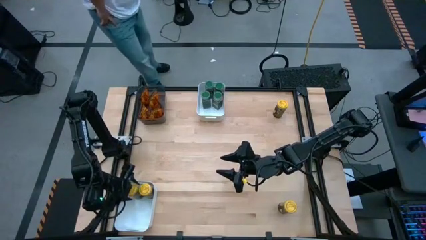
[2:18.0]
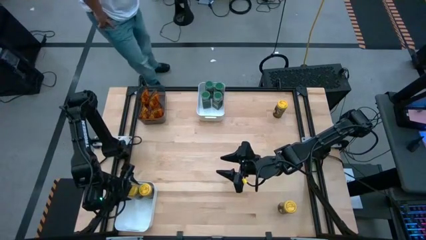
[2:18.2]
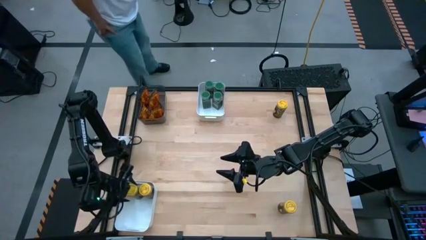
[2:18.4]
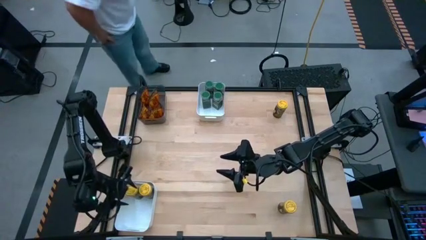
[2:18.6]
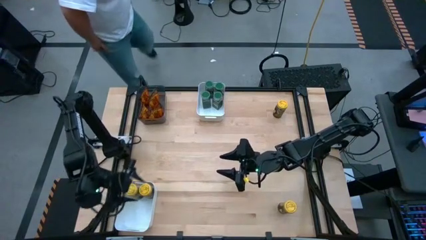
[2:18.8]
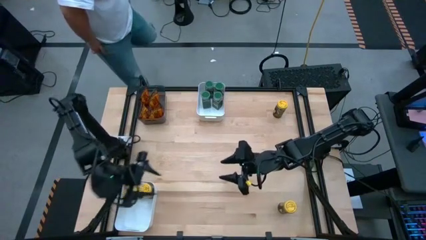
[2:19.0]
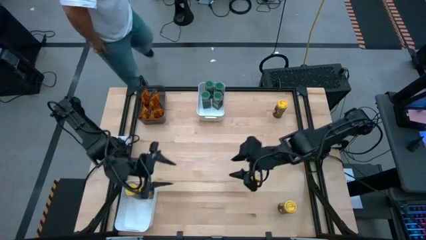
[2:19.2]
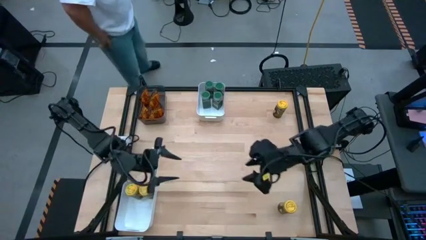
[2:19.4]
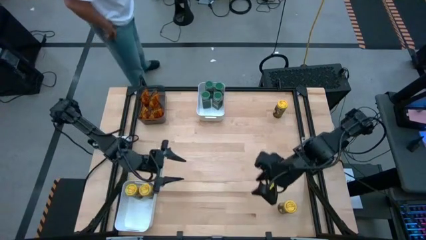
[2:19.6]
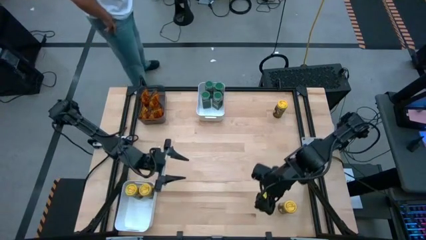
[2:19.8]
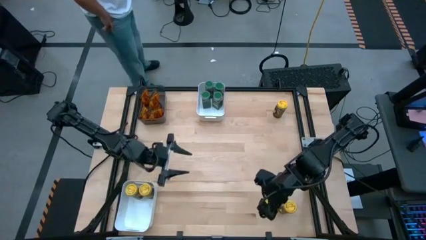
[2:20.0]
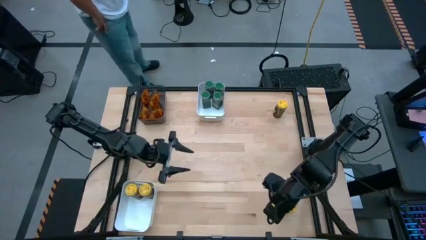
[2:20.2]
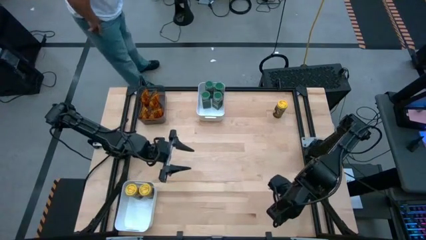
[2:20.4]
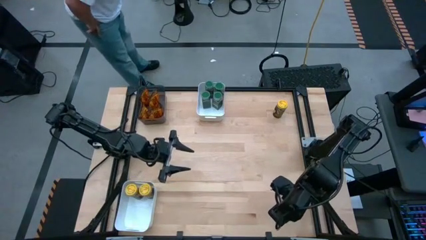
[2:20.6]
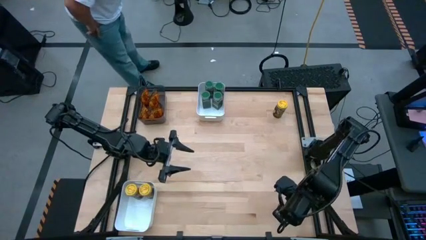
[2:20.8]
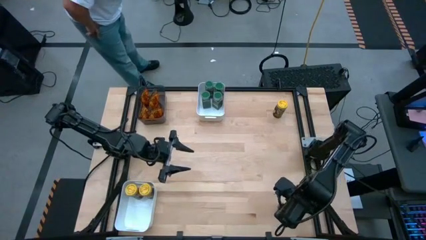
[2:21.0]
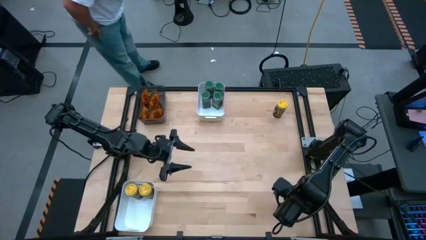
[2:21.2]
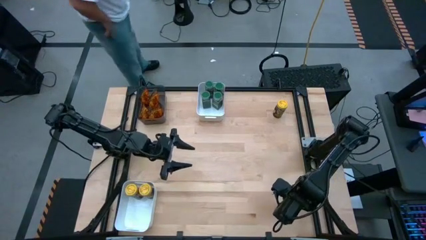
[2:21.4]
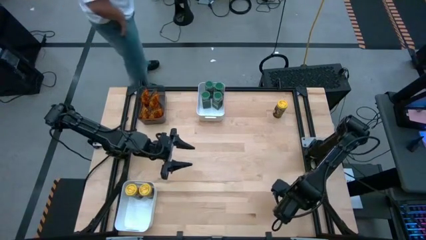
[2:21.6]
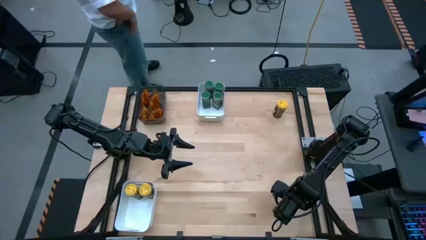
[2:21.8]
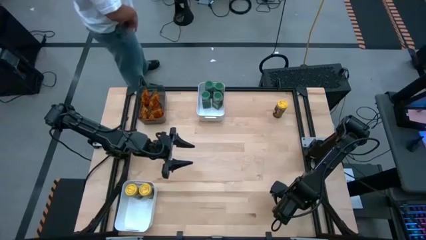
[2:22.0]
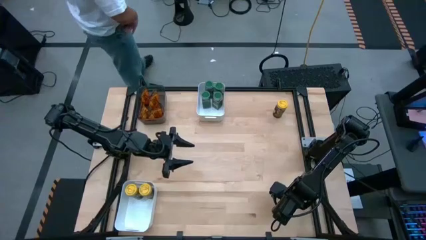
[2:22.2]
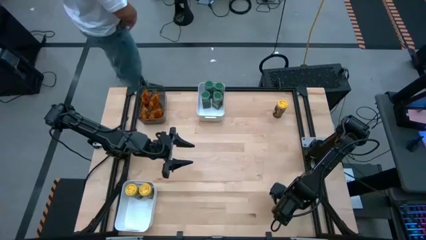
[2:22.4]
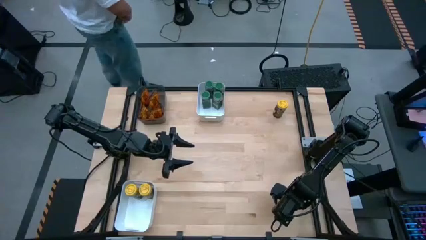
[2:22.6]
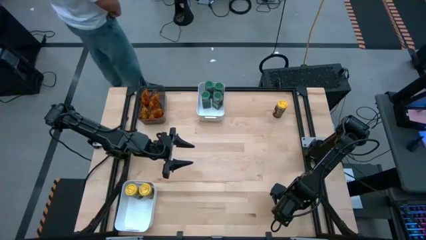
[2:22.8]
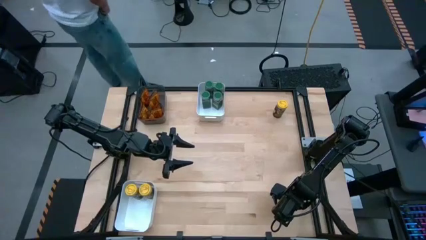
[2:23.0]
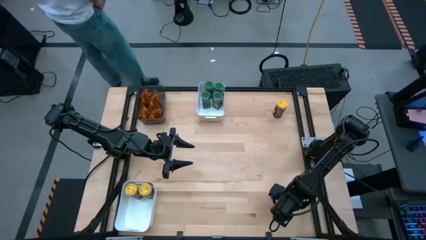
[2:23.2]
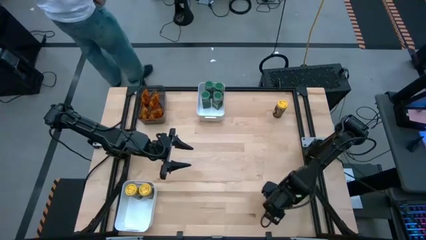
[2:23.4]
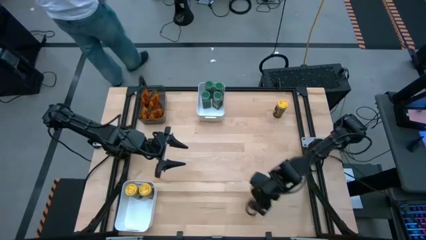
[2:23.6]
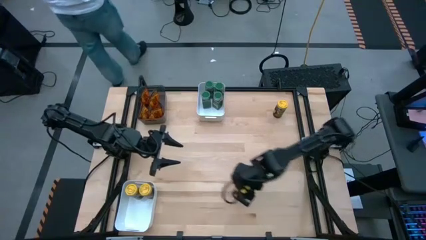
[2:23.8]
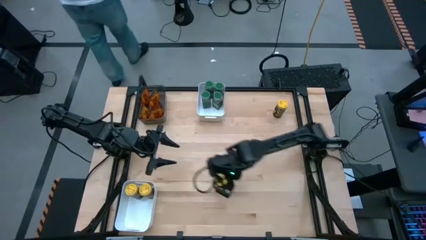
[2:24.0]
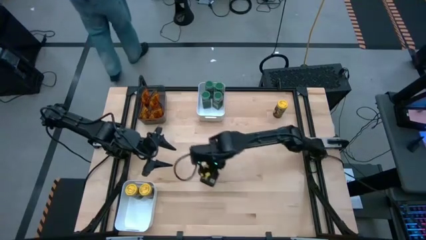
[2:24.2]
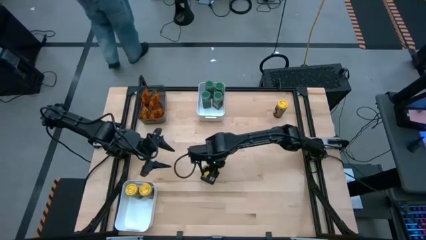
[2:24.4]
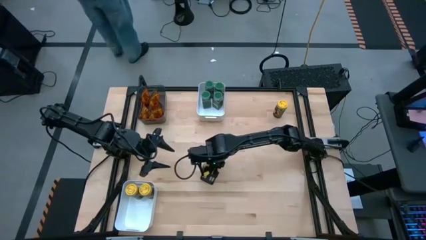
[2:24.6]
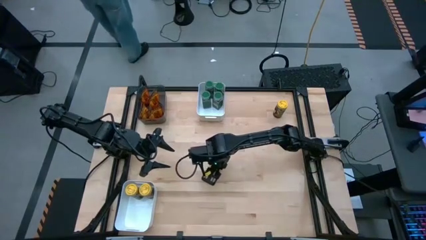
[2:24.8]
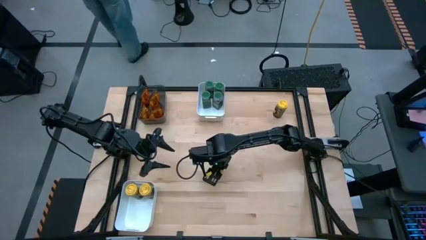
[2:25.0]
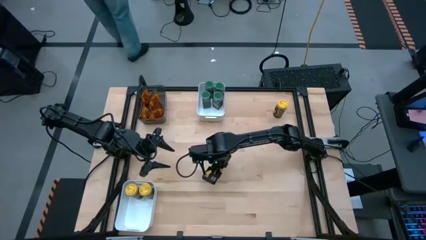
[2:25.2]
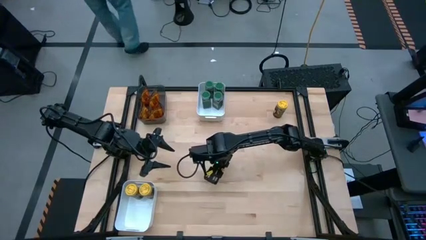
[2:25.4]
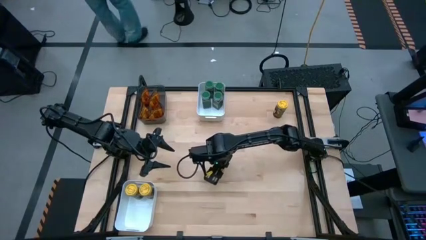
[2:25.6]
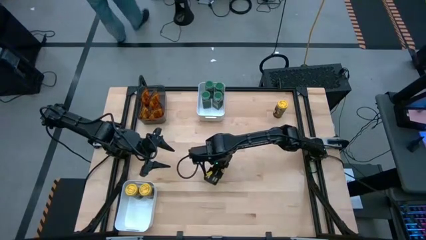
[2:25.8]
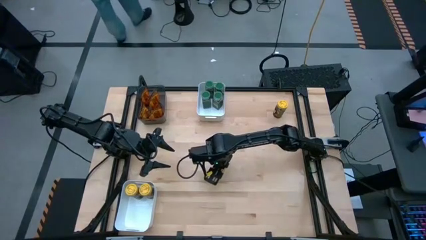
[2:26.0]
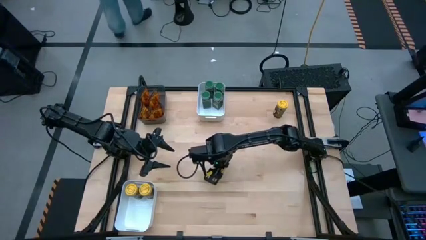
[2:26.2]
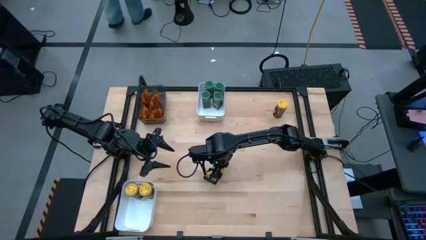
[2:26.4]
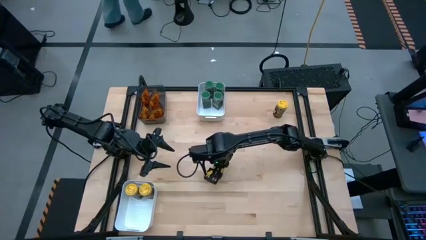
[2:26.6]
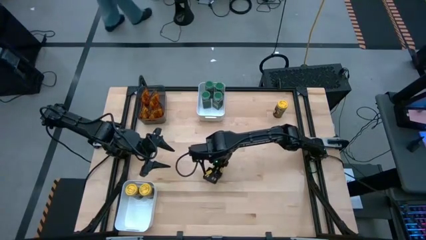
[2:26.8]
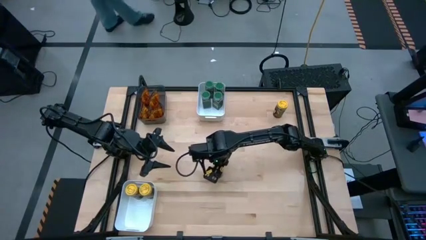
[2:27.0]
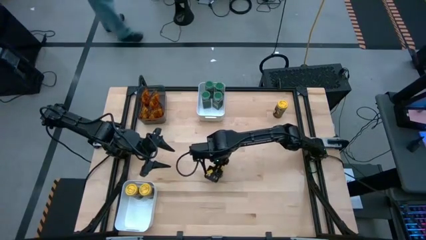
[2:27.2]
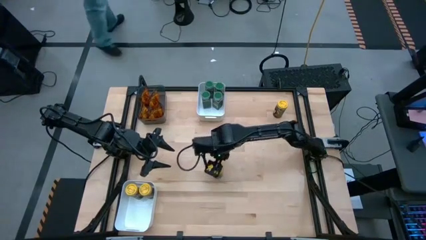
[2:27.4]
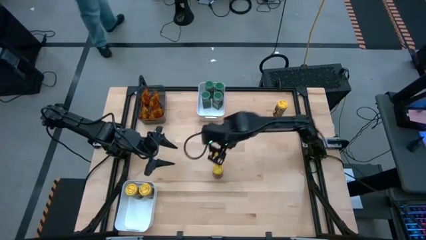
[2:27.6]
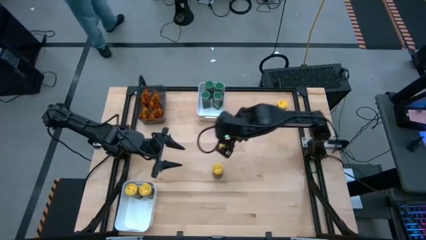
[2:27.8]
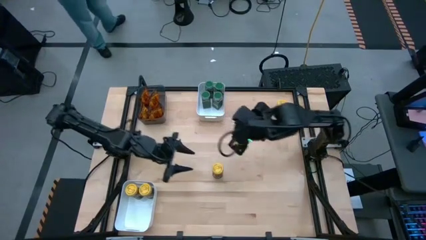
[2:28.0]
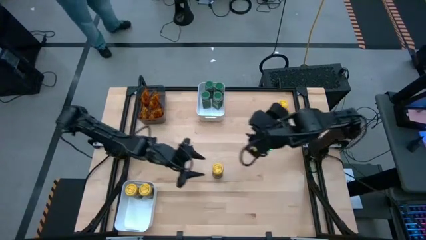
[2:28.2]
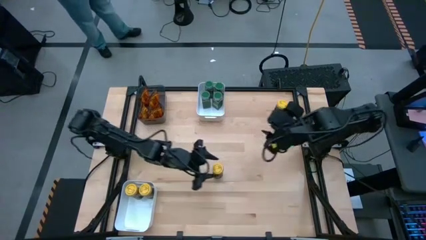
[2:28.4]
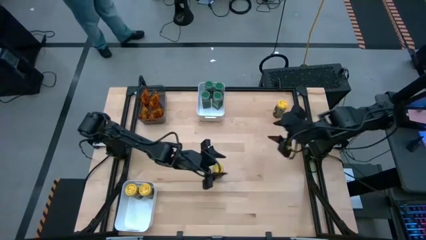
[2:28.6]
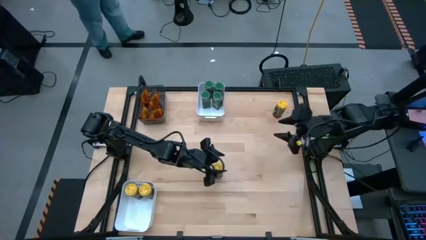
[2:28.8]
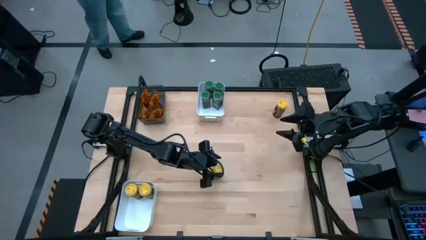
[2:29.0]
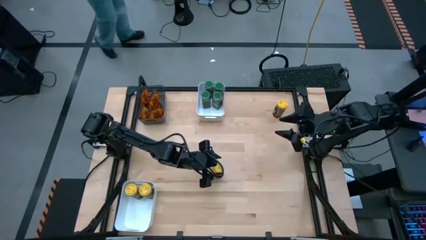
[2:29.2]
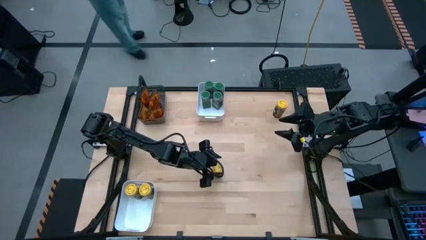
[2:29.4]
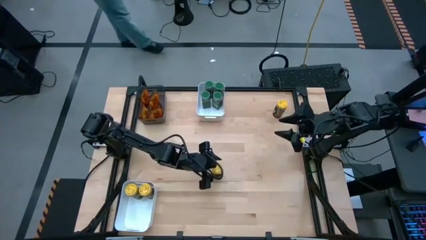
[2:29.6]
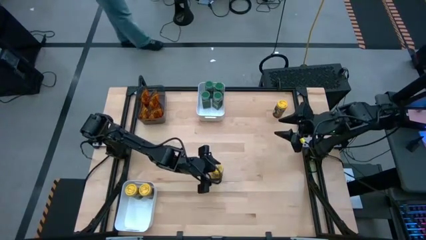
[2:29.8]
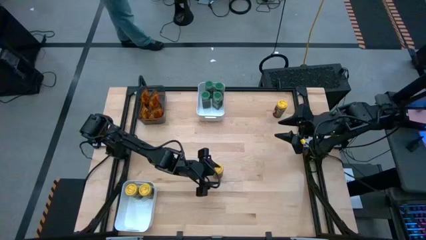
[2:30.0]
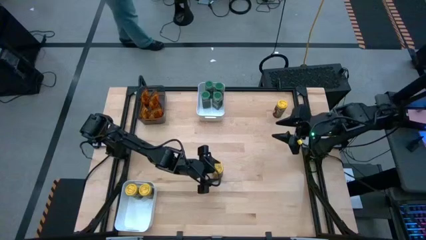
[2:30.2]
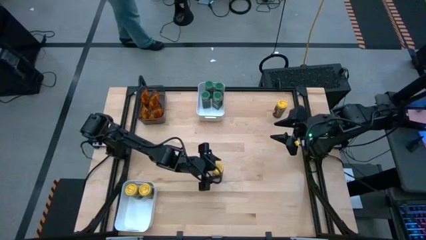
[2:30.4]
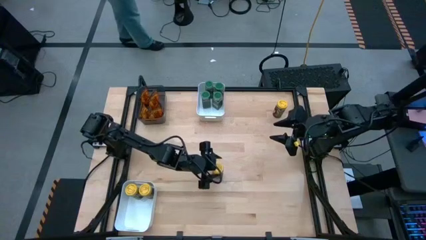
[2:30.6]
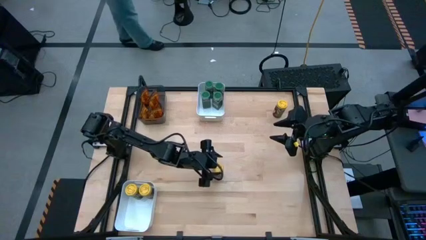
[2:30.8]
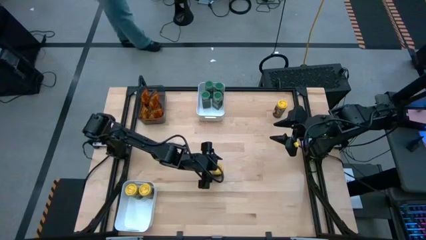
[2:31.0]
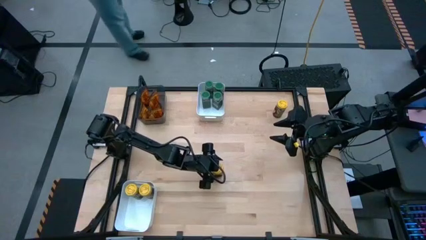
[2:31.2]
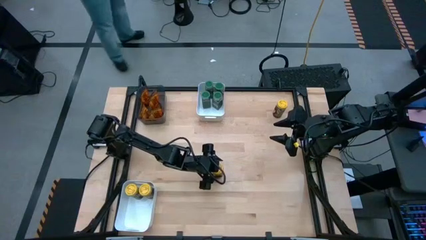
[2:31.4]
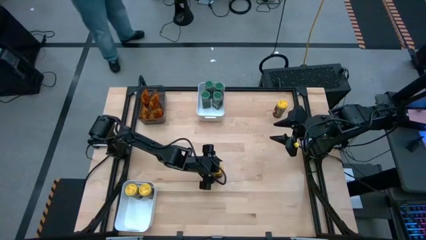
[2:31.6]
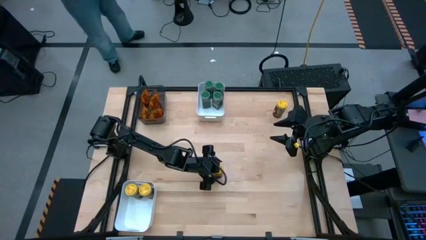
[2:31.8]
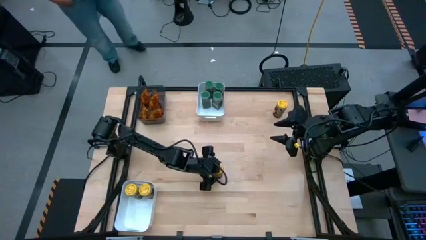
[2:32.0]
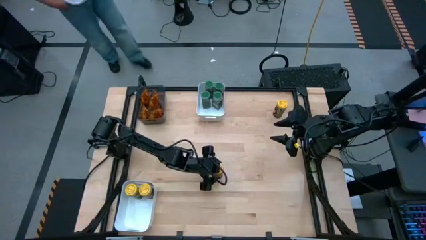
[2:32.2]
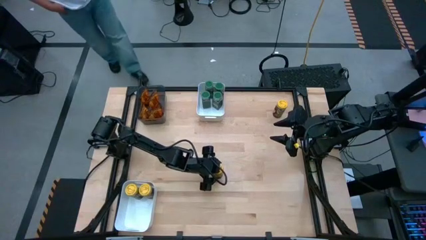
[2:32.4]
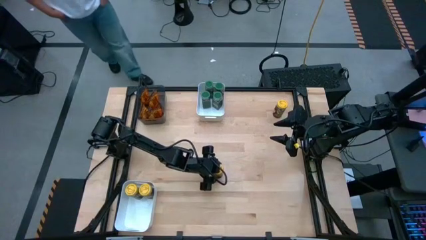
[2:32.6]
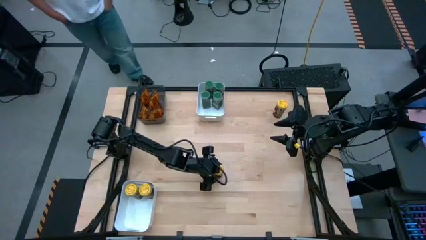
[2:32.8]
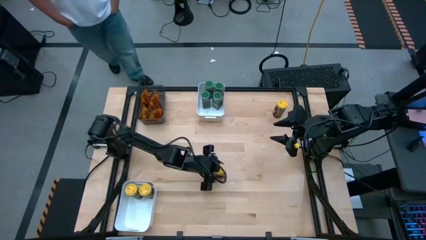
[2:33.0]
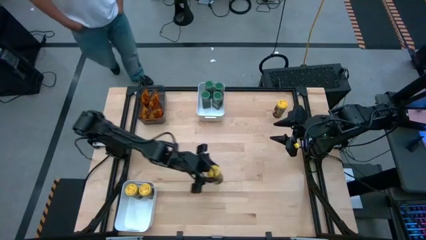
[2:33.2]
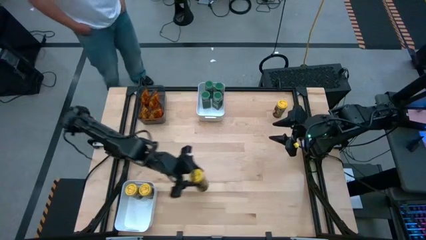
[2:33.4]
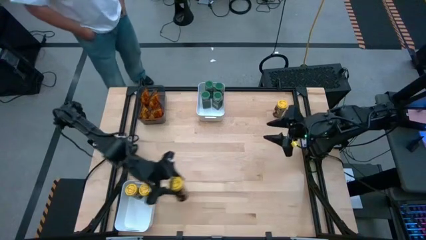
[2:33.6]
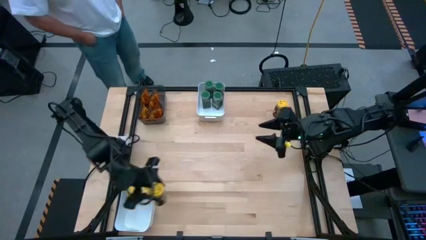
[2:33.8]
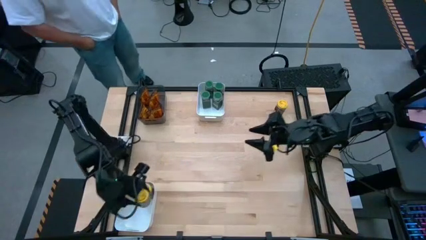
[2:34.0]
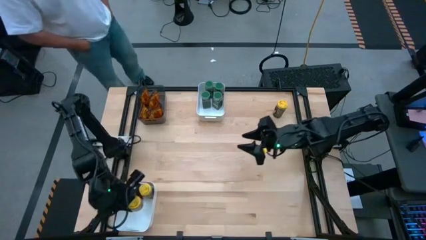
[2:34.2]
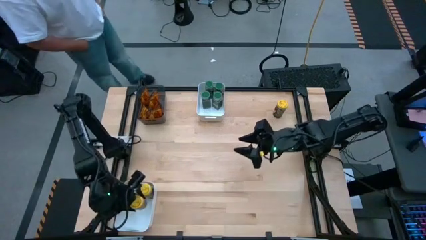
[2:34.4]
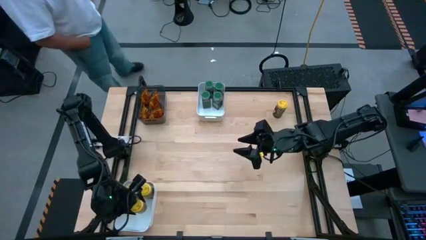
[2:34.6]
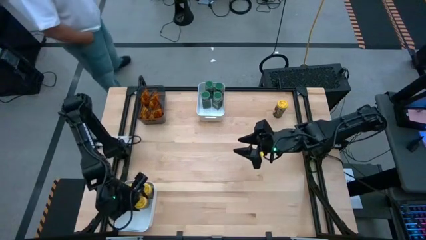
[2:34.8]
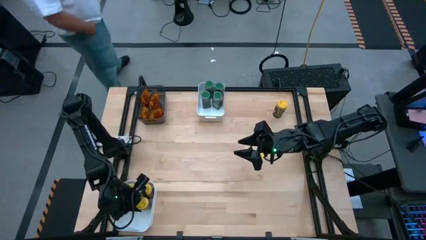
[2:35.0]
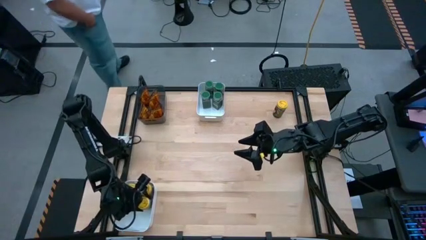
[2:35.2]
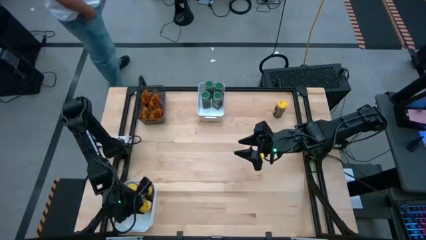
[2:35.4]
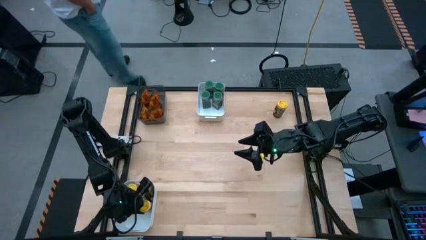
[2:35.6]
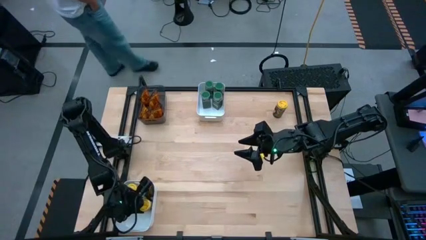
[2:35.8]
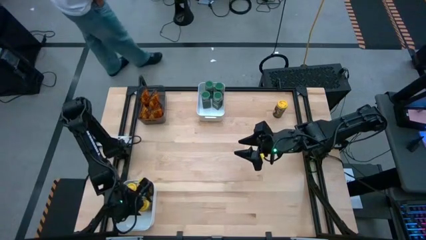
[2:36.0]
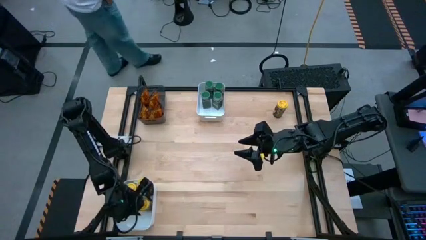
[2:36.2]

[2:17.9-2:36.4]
Task: Sort spices by type
Put the bottom yellow seasoning bottle into the bottom white bin
